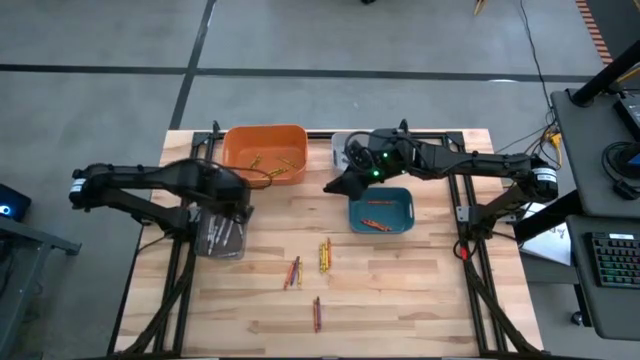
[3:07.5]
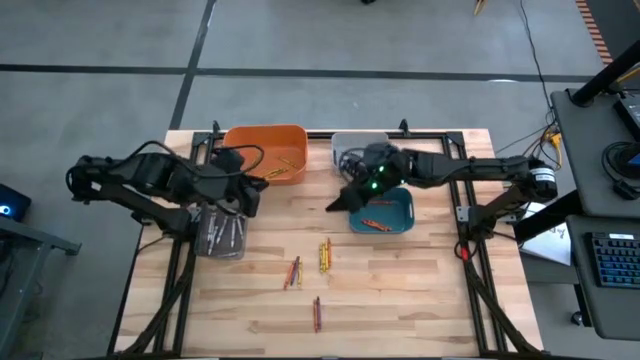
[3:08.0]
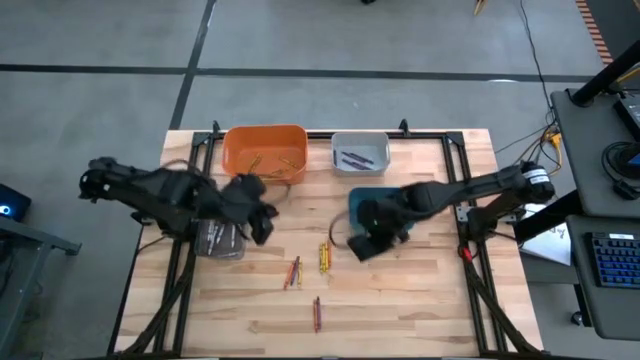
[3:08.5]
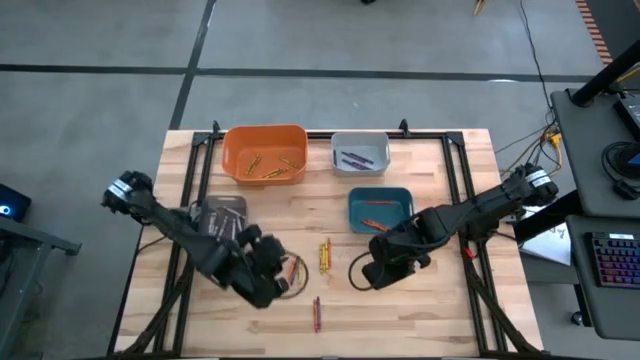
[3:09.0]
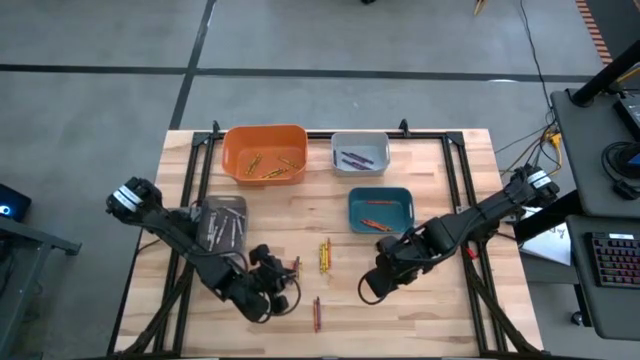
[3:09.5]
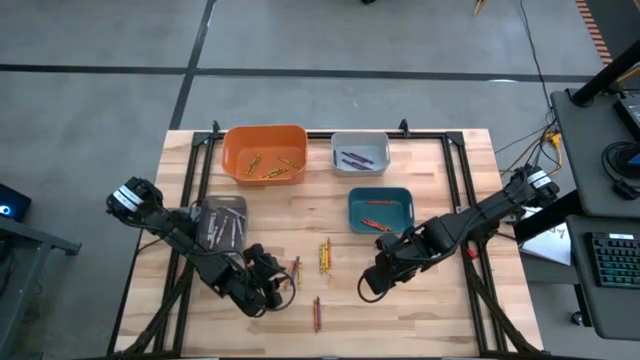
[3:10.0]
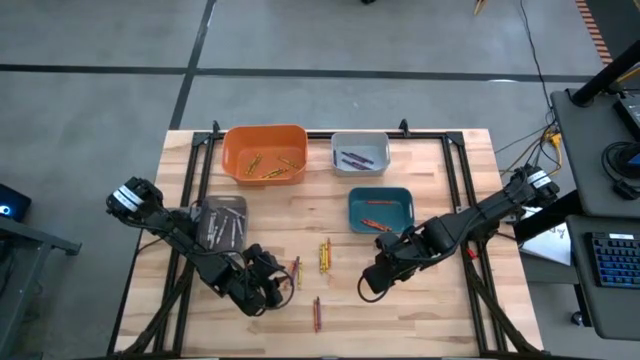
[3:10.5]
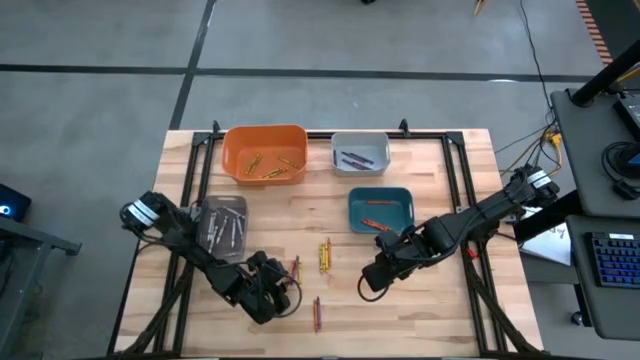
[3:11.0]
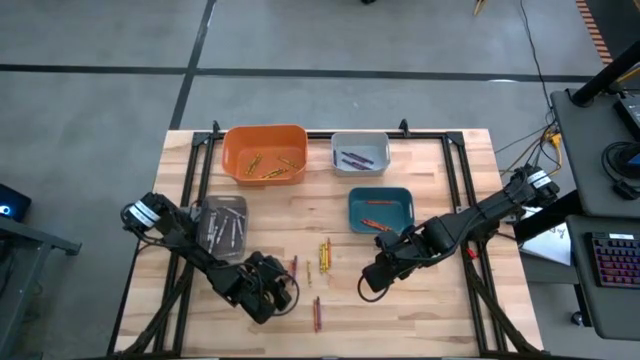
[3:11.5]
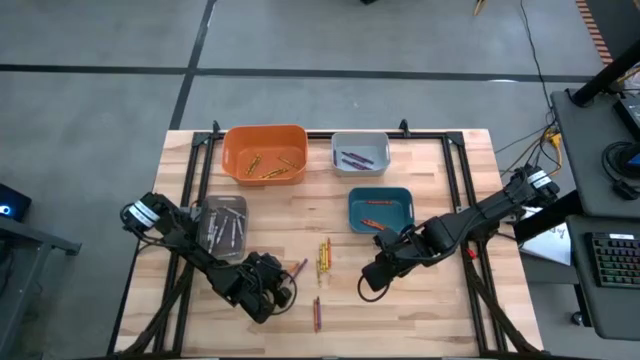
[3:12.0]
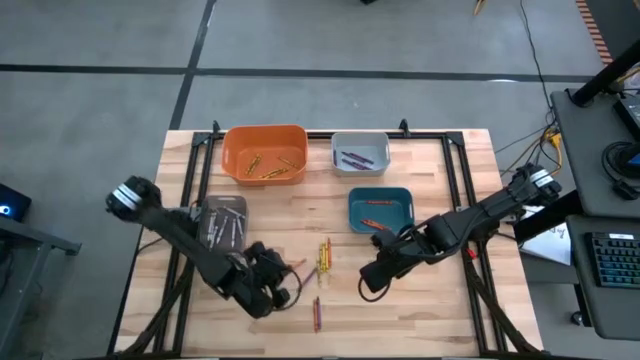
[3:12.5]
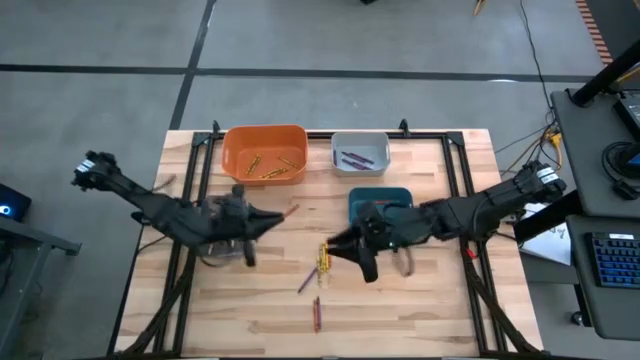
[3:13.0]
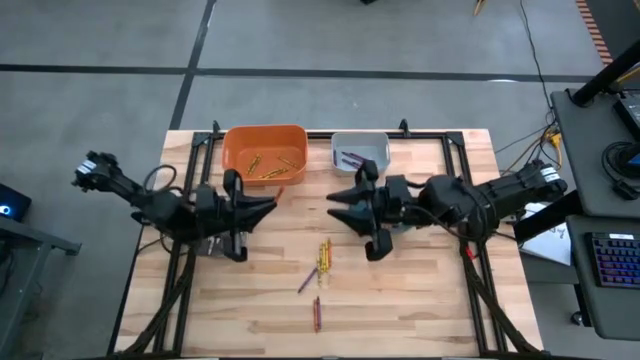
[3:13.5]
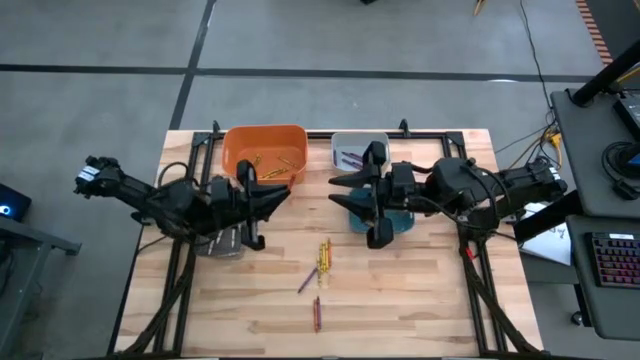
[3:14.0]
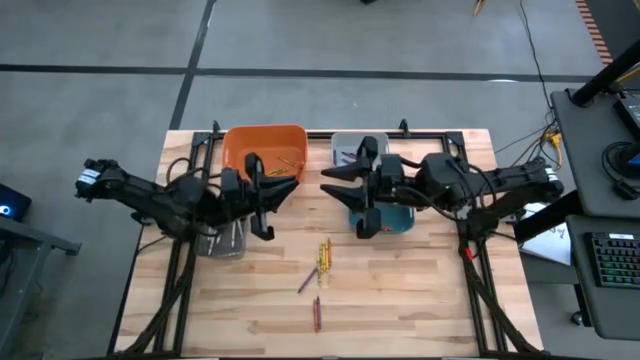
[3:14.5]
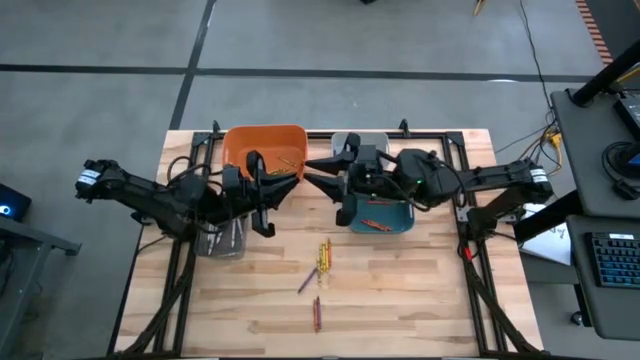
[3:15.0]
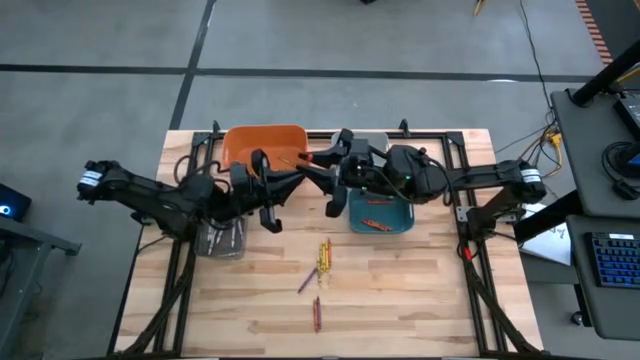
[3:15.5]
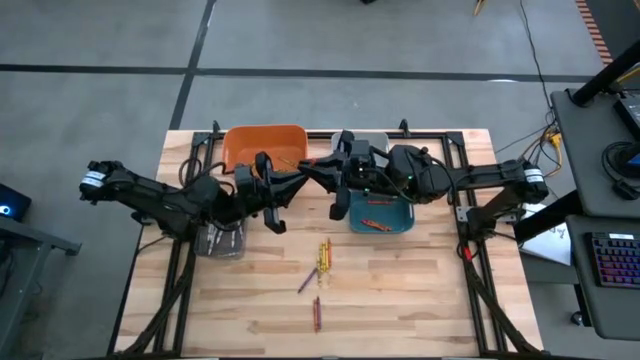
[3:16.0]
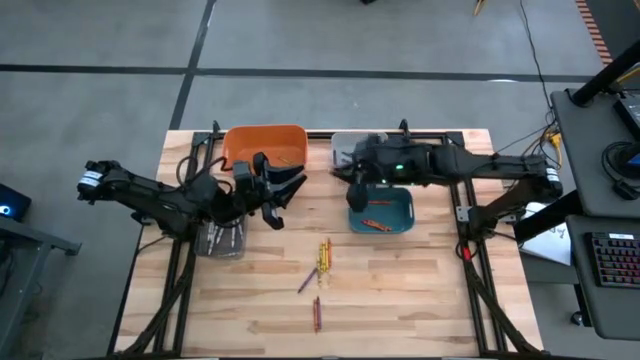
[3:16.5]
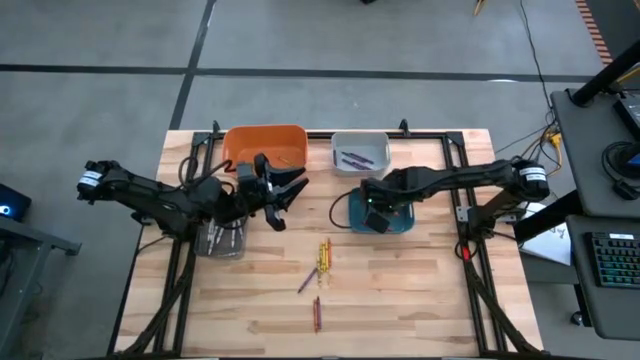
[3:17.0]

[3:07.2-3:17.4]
Task: Sort crayons
Put the orange crayon into the blue bin

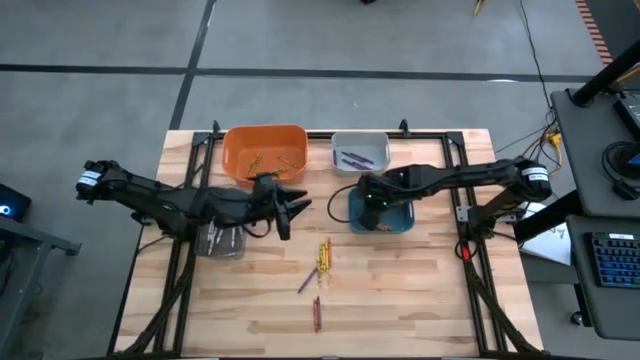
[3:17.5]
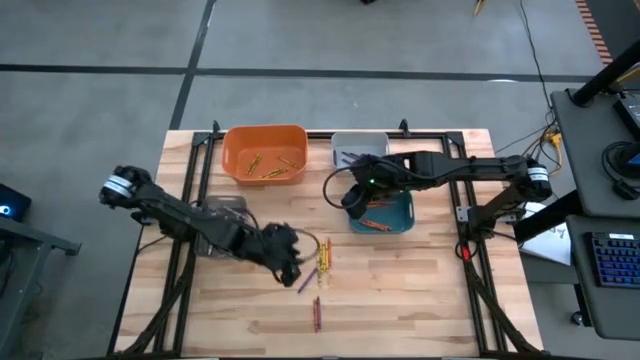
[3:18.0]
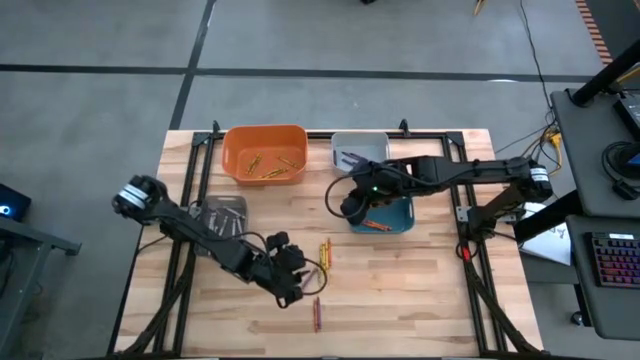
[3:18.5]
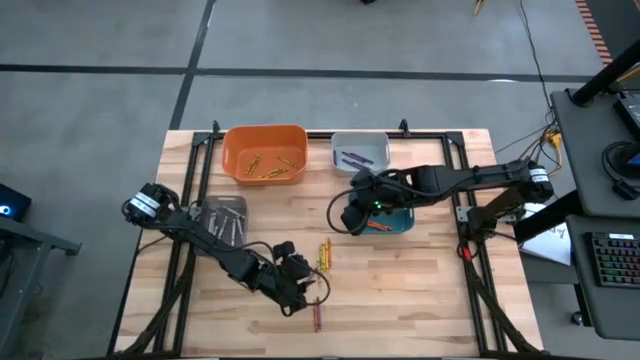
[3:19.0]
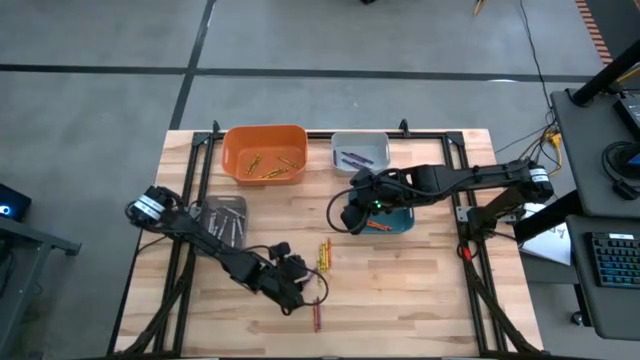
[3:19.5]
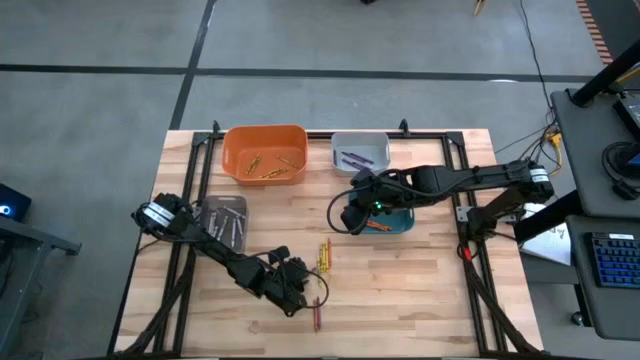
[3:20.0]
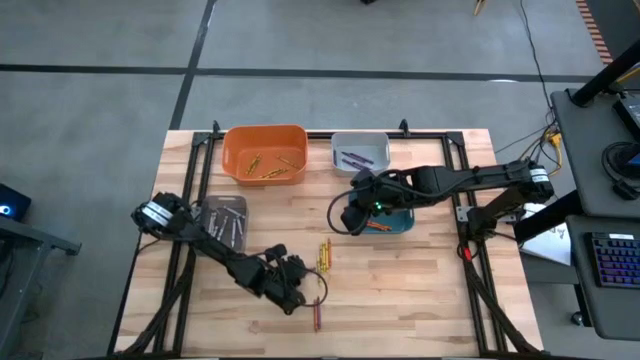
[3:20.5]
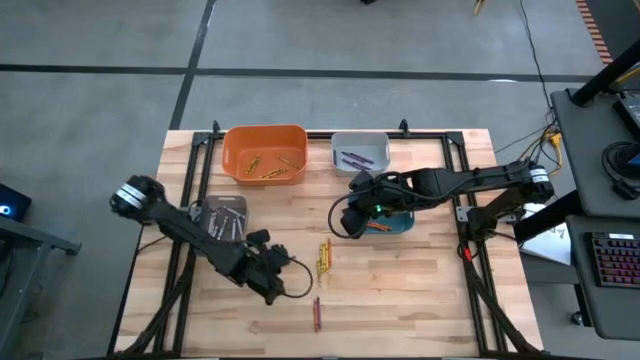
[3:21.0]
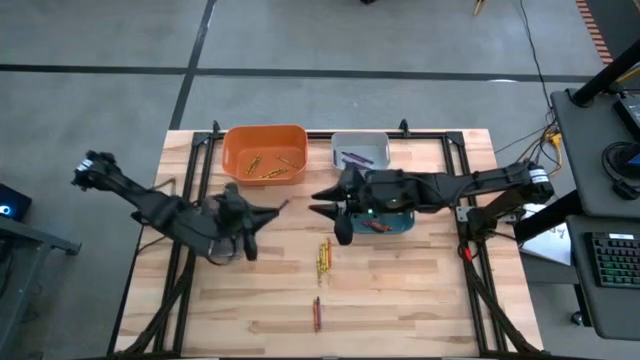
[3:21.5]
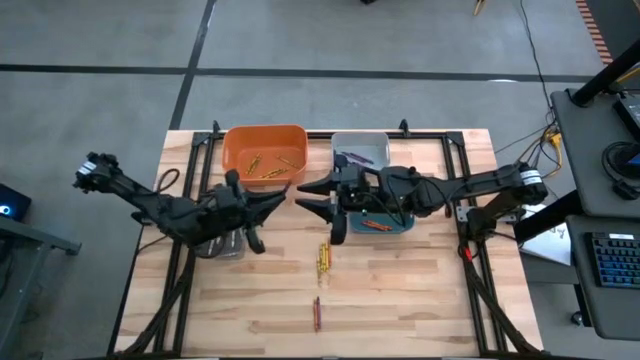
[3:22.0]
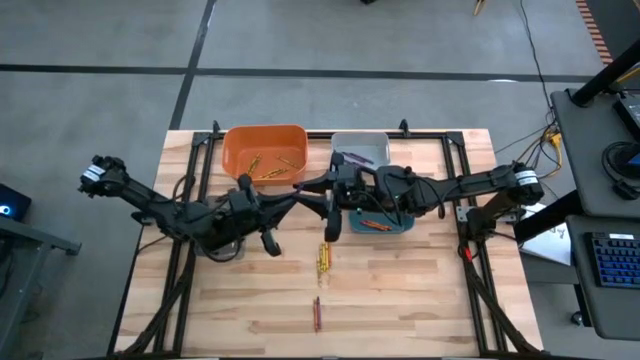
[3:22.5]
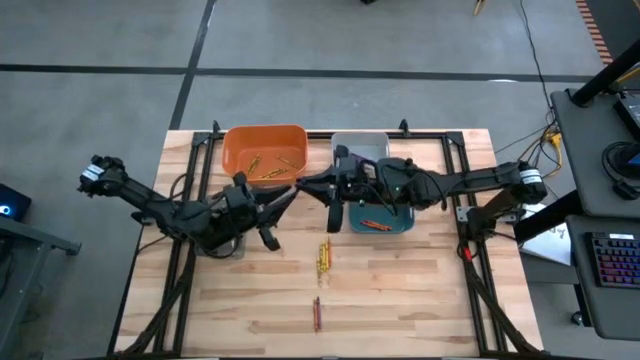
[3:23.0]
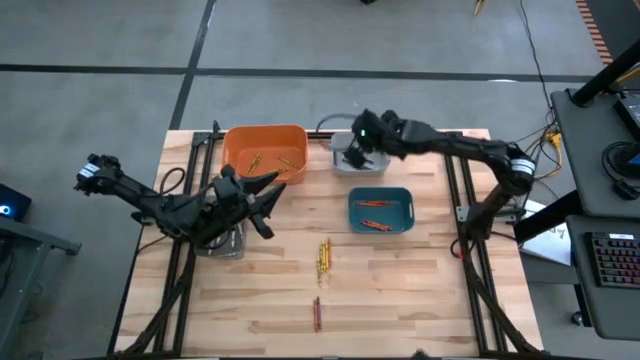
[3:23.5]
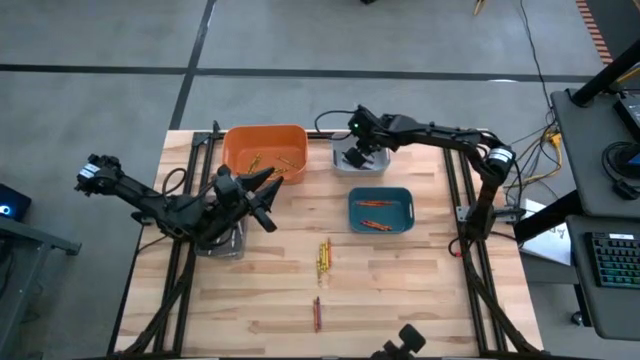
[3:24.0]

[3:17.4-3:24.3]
Put the violet crayon into the gray bin

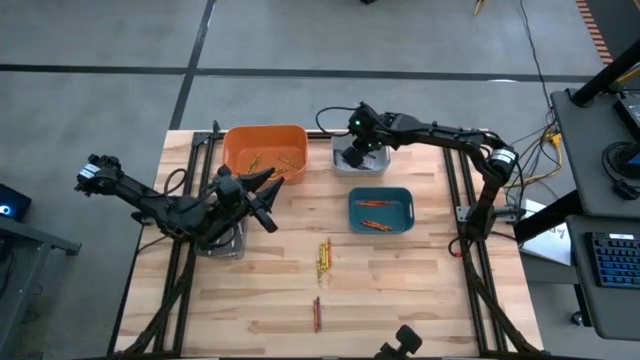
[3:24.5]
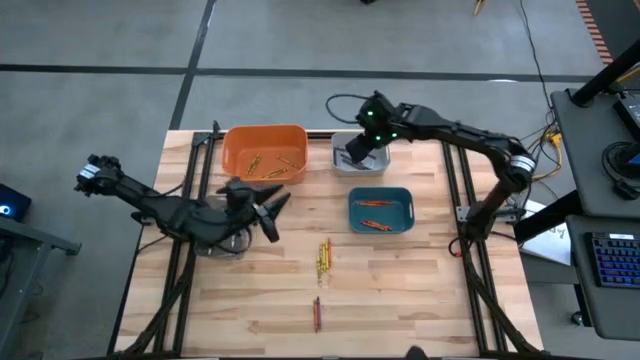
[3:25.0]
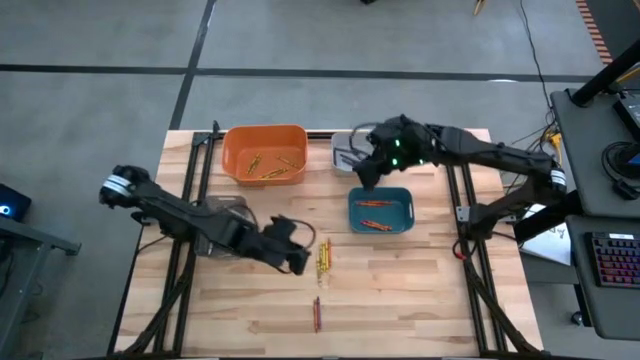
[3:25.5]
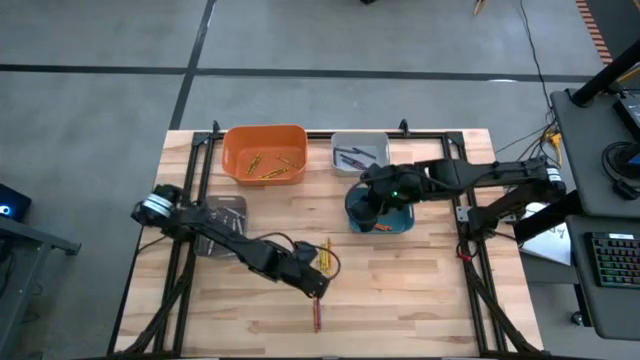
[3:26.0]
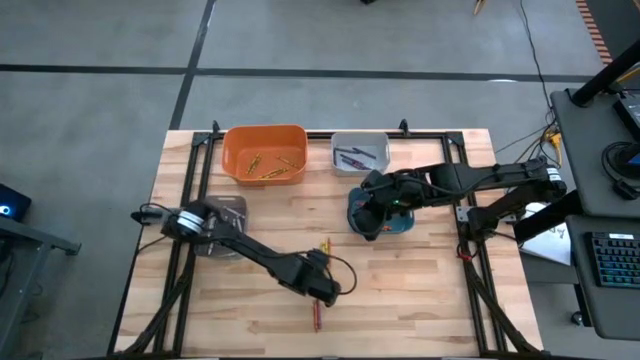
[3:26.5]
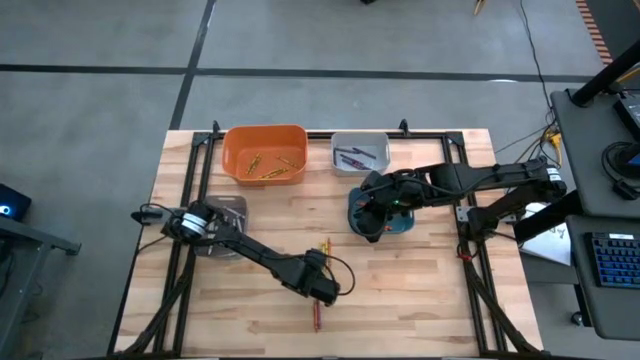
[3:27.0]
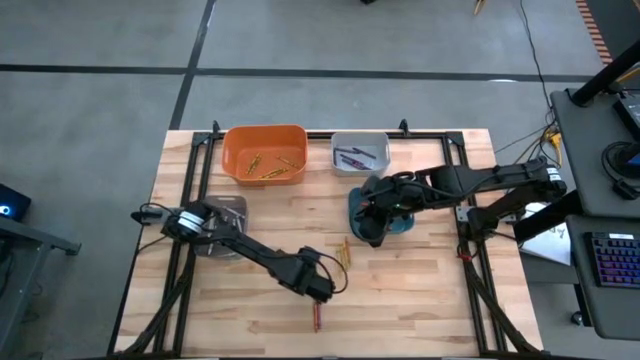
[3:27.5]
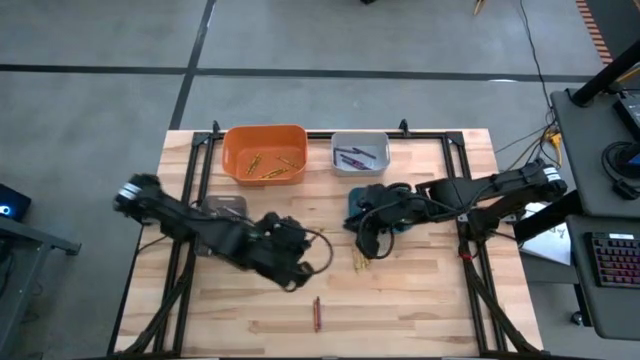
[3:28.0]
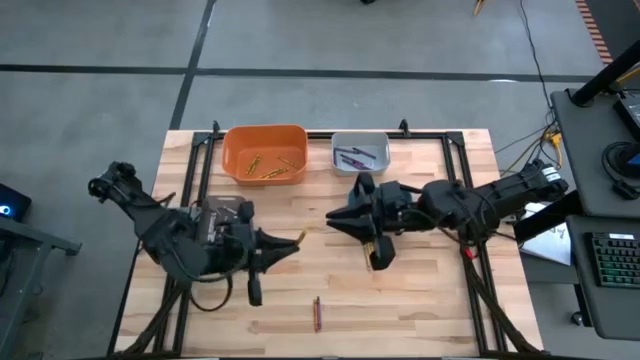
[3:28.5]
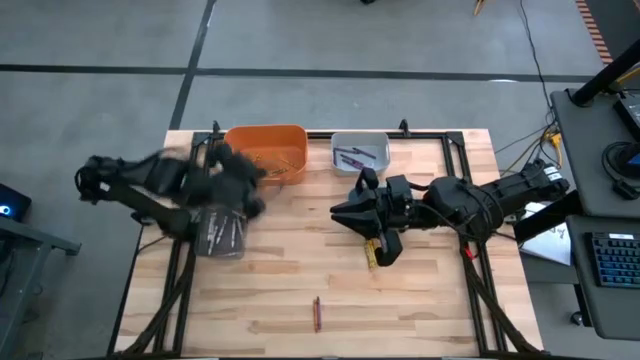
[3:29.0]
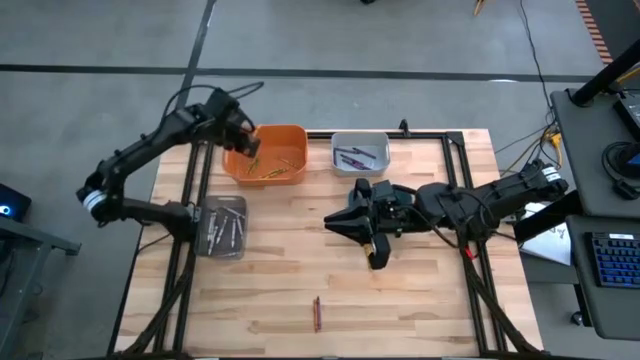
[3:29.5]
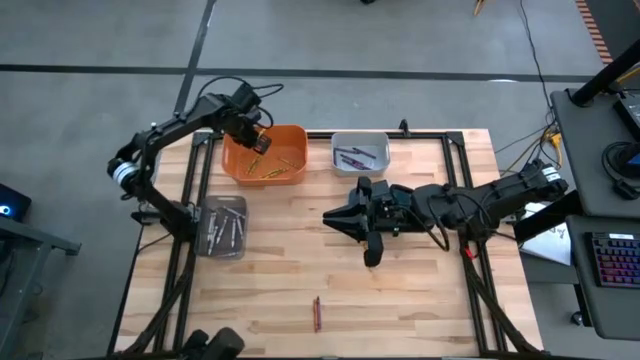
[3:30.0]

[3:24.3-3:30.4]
Put the yellow crayon into the orange bin
